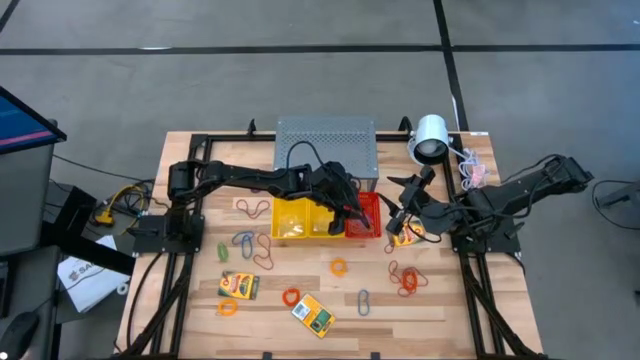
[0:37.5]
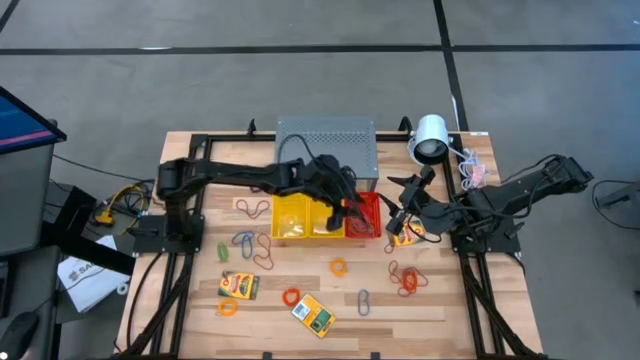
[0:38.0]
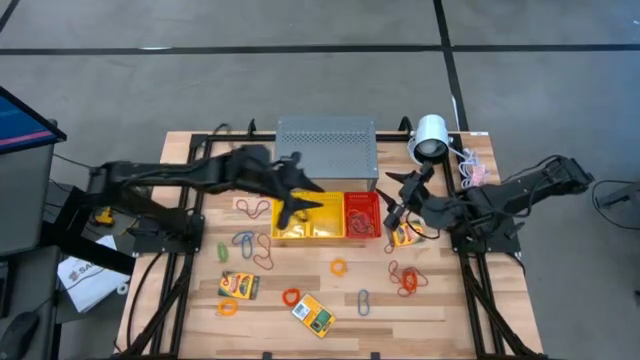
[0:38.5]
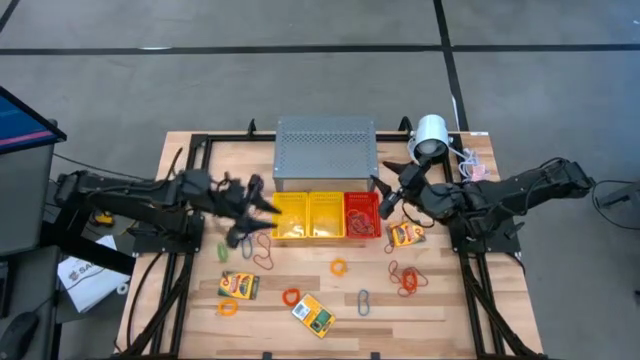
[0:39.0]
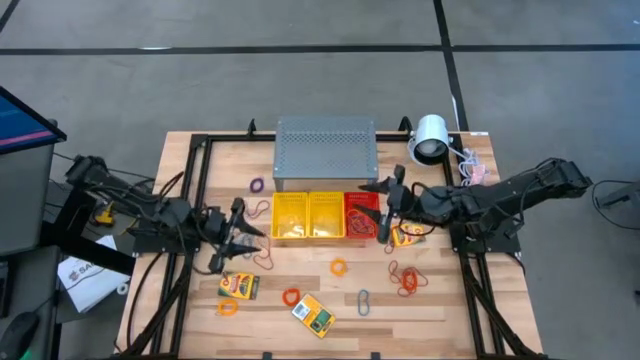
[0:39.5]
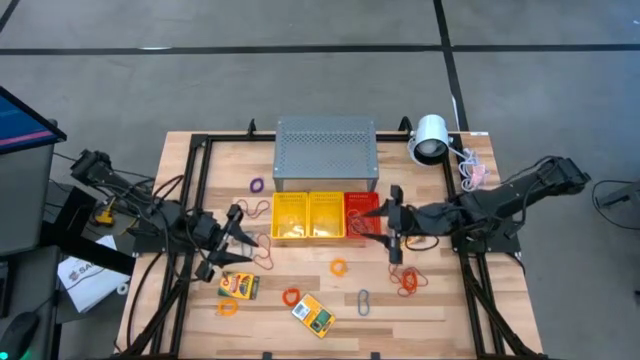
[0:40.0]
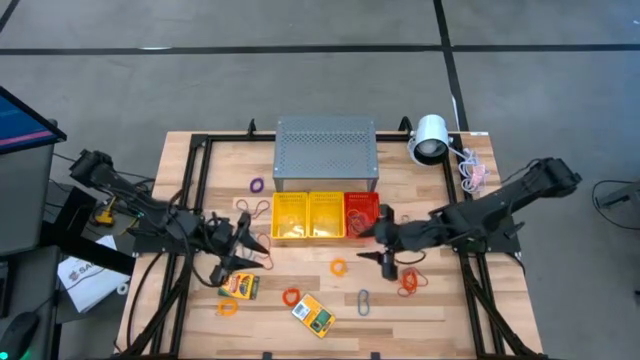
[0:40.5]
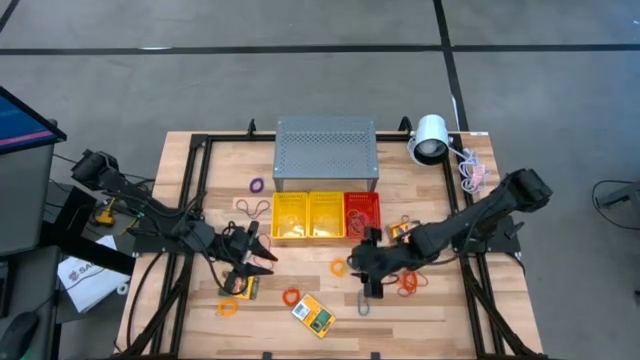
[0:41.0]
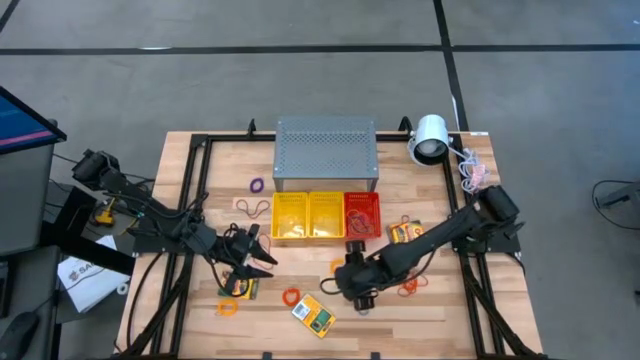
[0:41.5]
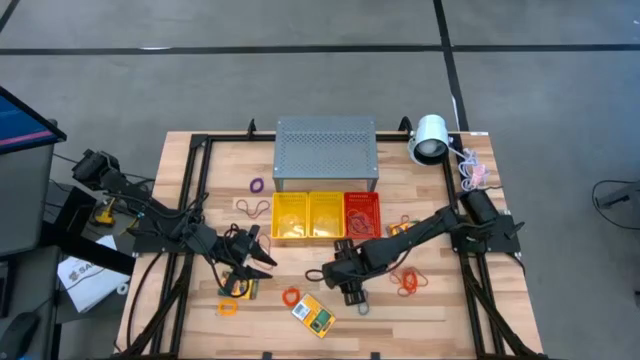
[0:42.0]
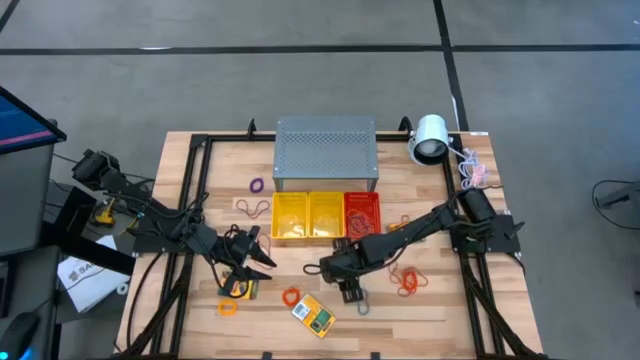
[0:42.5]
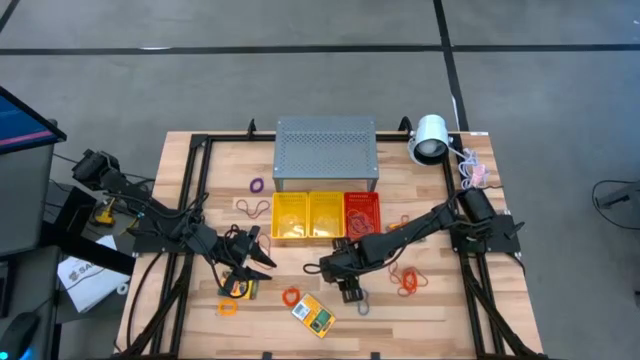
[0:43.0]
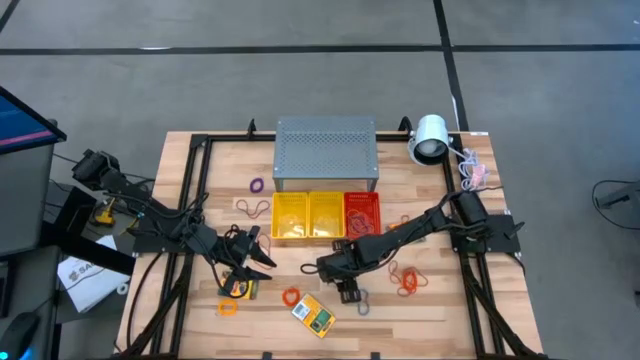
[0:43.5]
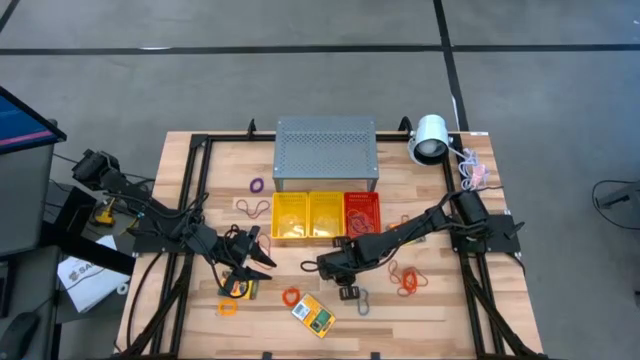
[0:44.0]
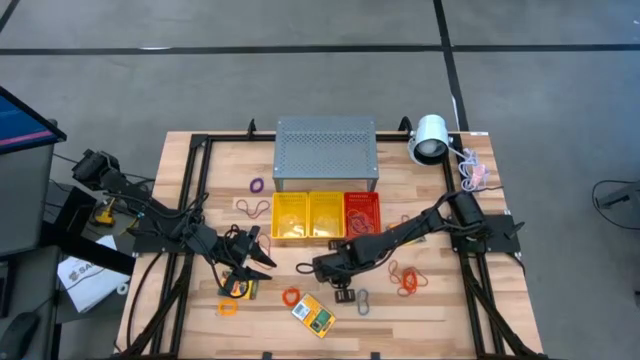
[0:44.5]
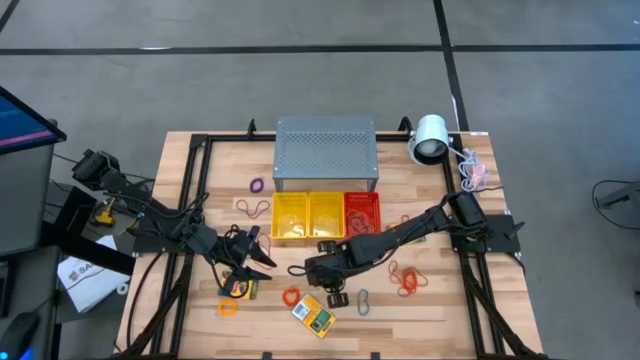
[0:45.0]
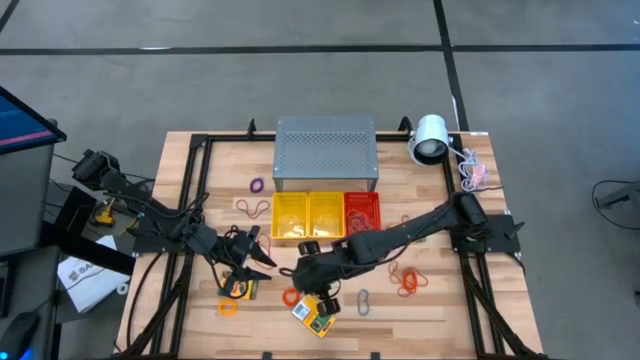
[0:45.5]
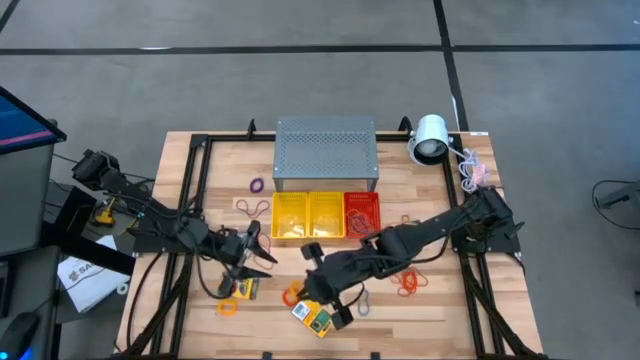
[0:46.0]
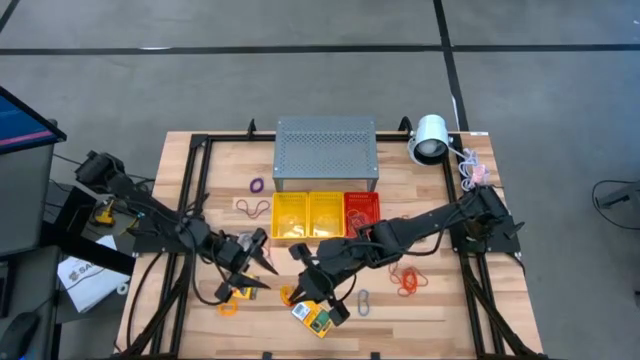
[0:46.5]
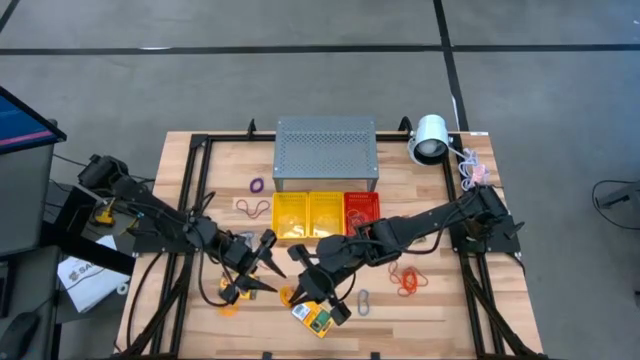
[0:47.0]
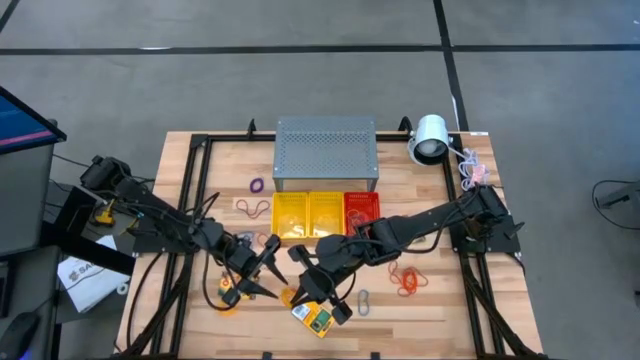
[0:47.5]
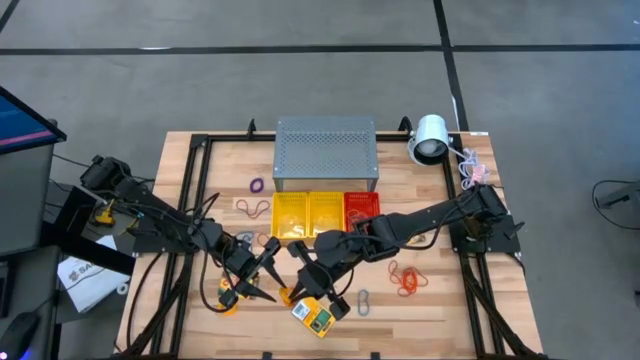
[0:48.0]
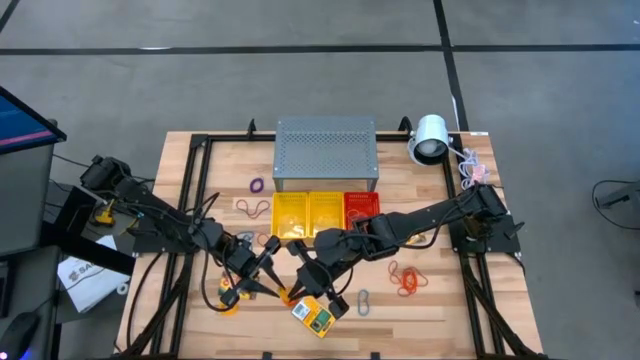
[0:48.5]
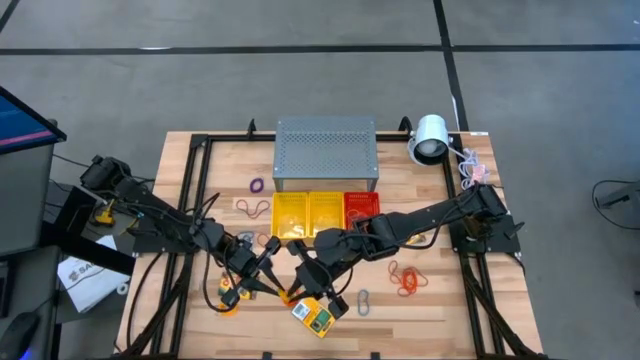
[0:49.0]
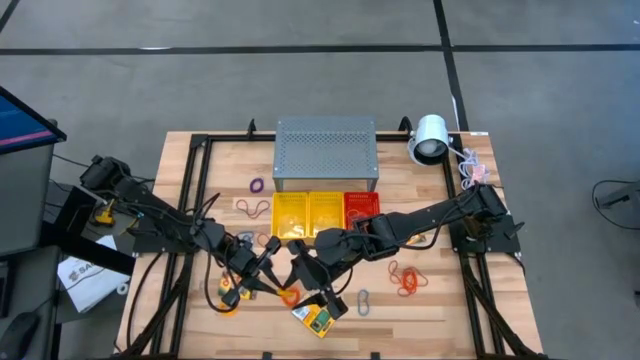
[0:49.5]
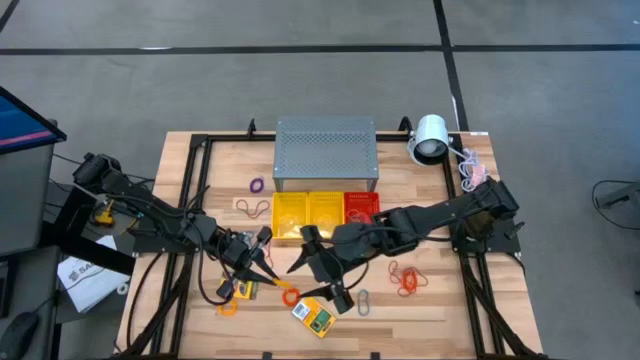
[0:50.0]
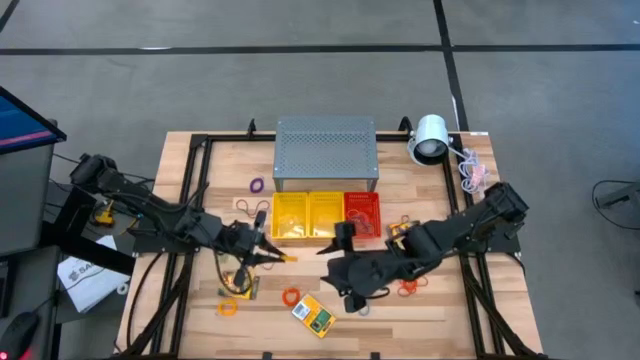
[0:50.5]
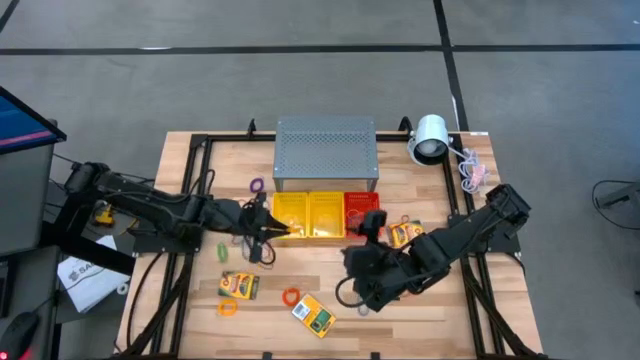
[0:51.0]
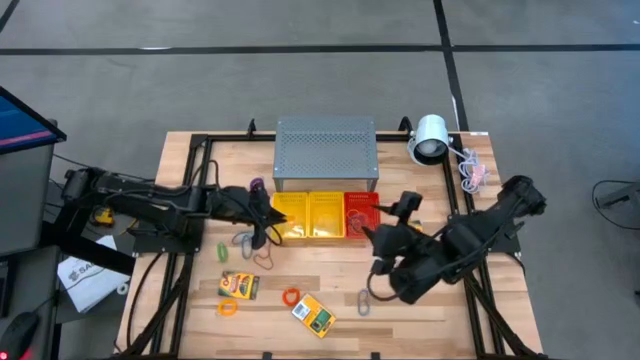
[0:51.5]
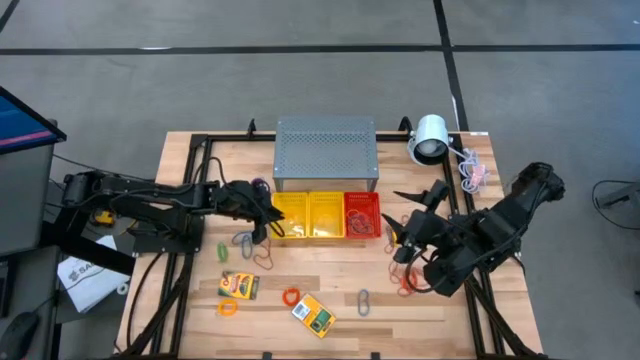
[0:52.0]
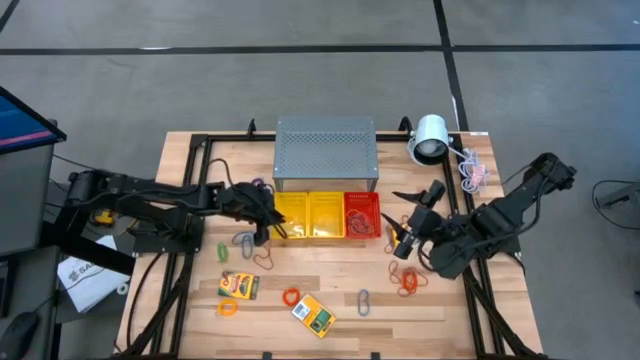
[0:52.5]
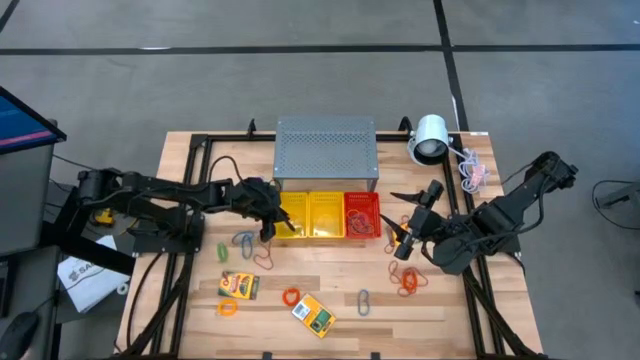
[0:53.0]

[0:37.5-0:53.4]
Task: Pick & Place Office Desk Supplies
Put the yellow spring keychain into the left yellow bin

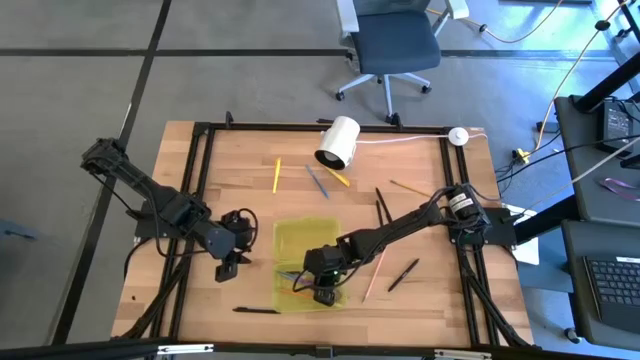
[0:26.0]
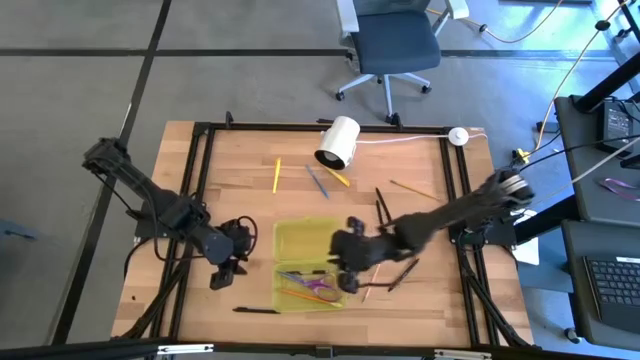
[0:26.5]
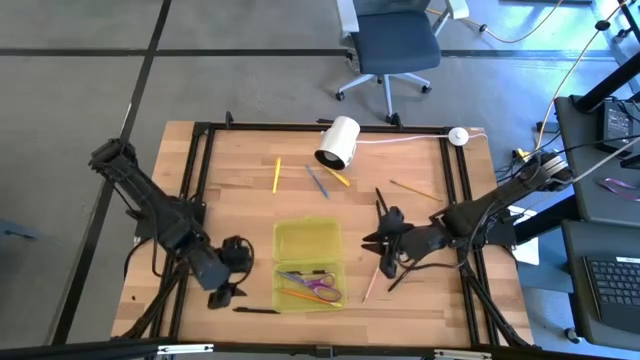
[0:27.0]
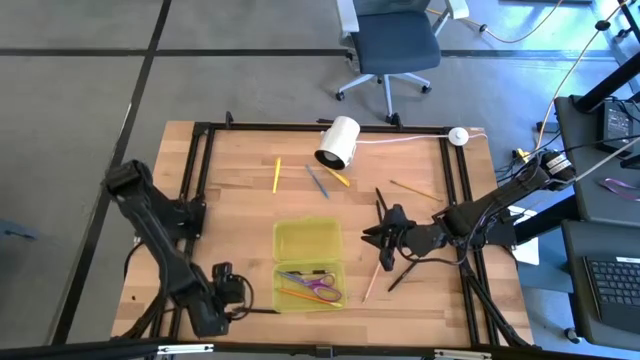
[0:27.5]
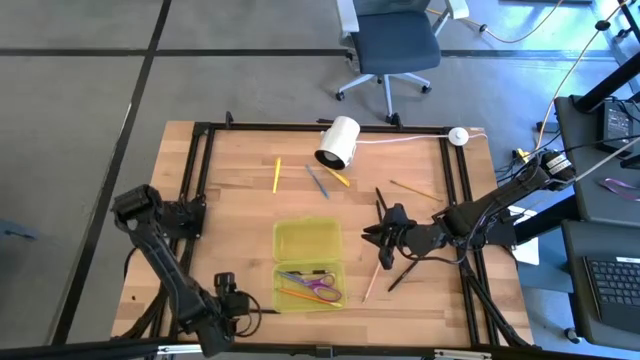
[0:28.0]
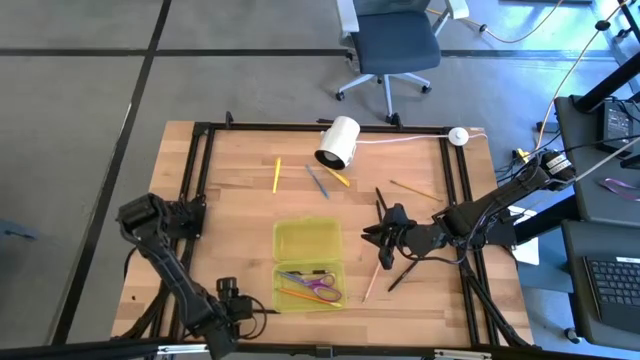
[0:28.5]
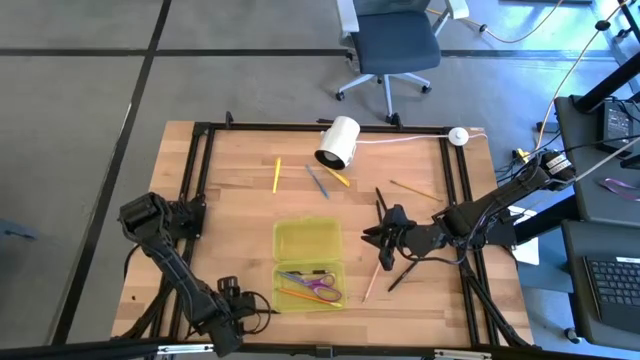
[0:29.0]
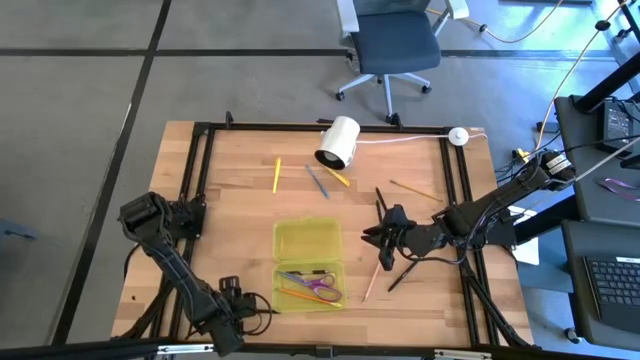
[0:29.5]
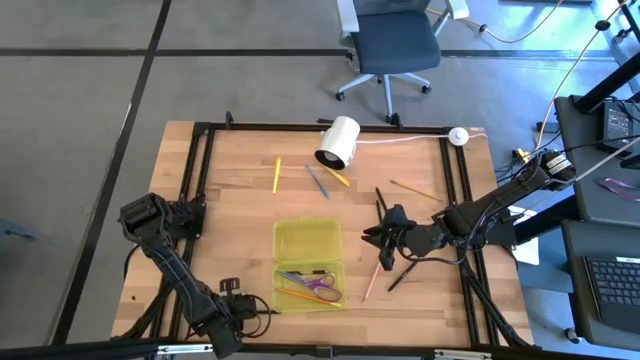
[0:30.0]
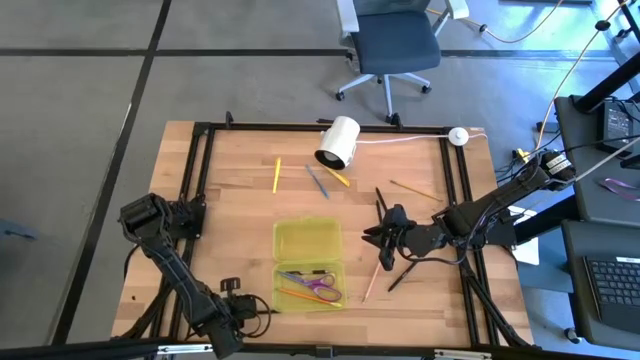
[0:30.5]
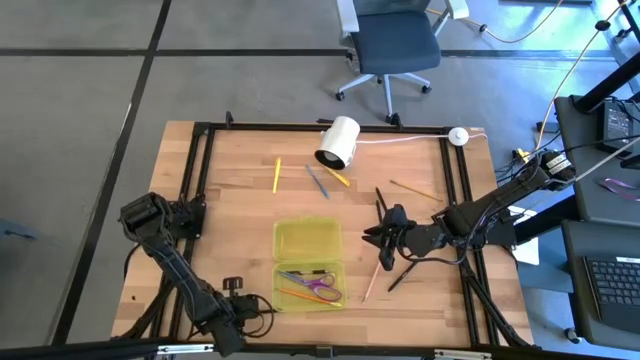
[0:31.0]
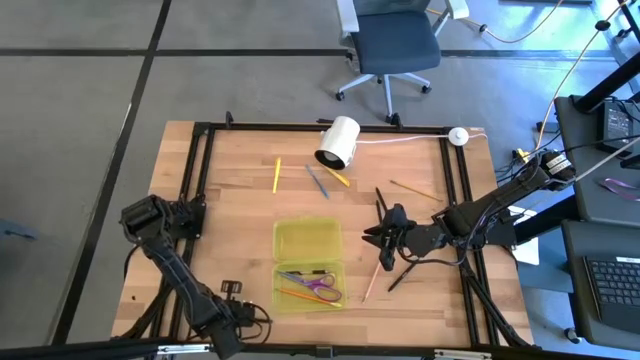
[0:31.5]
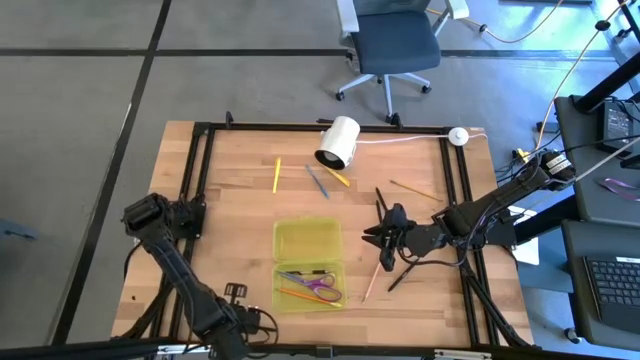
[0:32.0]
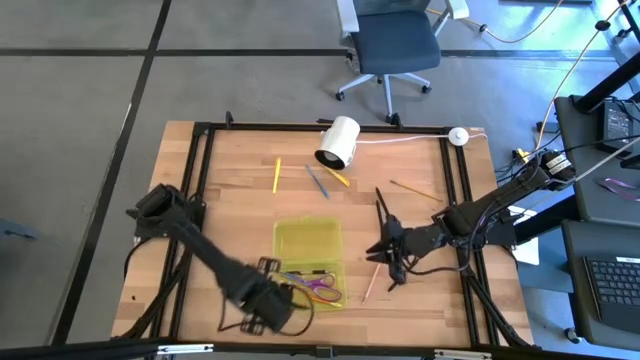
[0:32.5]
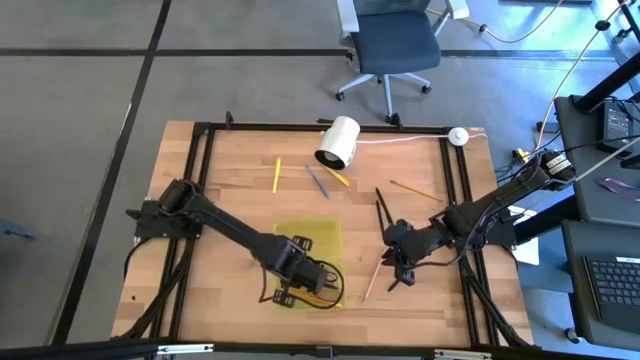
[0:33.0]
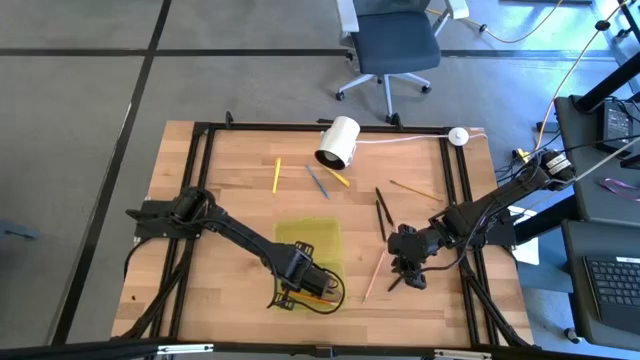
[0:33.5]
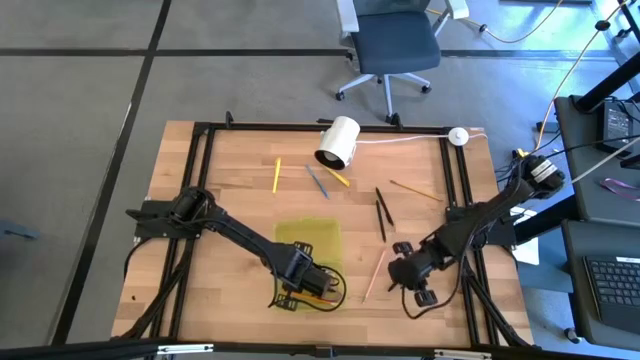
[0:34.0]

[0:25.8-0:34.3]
Task: Pick & place school supplies into a supply box
Put the black pen into the yellow supply box
